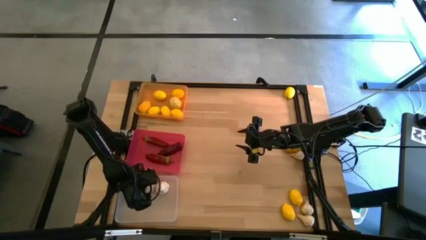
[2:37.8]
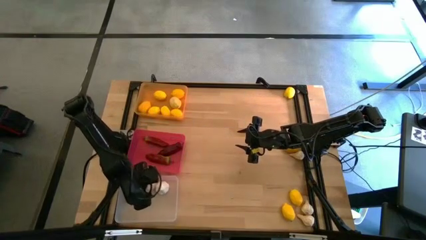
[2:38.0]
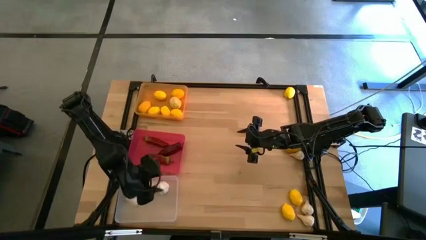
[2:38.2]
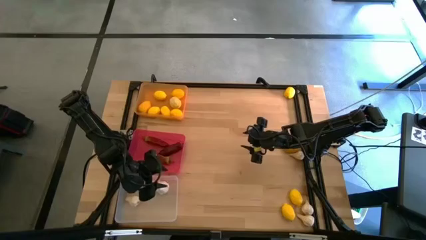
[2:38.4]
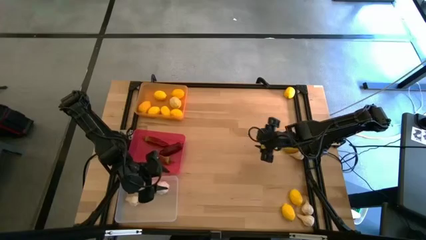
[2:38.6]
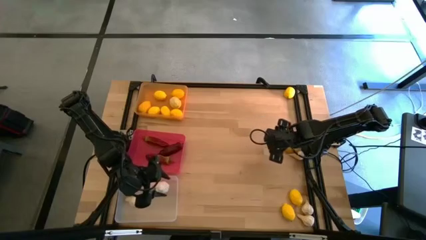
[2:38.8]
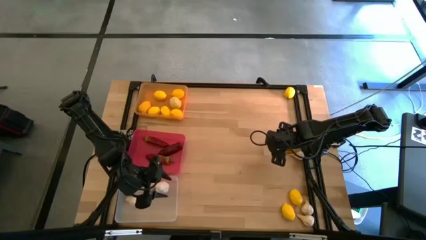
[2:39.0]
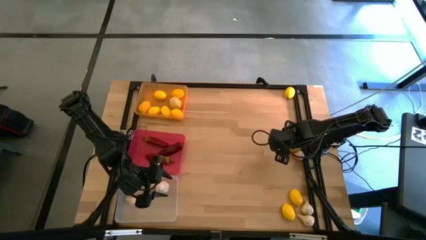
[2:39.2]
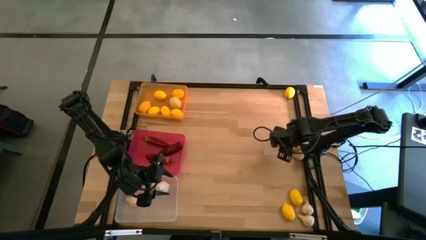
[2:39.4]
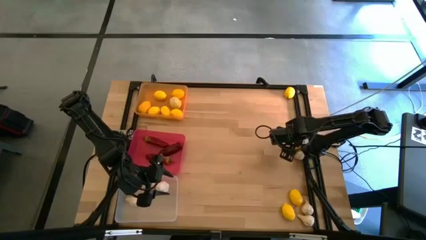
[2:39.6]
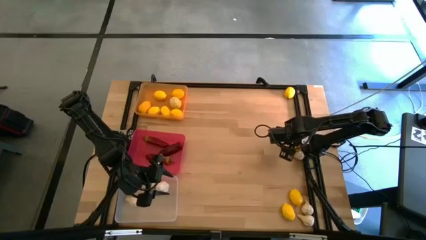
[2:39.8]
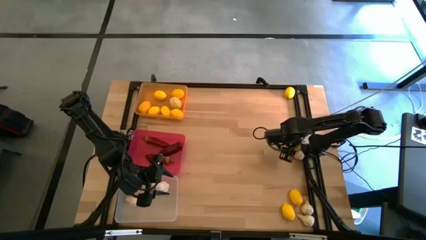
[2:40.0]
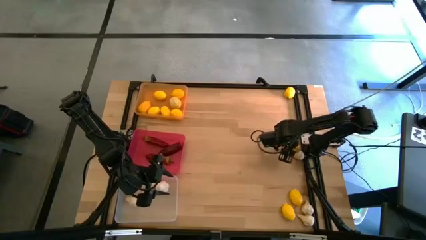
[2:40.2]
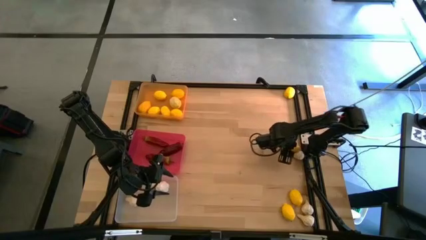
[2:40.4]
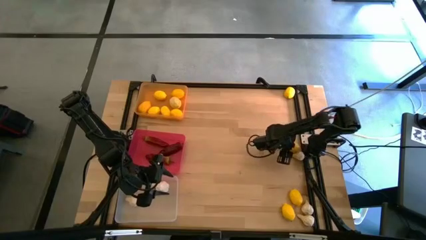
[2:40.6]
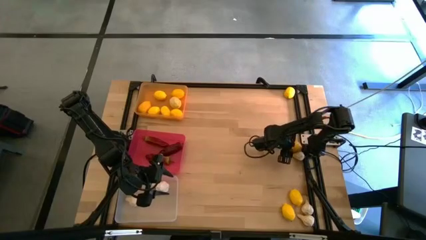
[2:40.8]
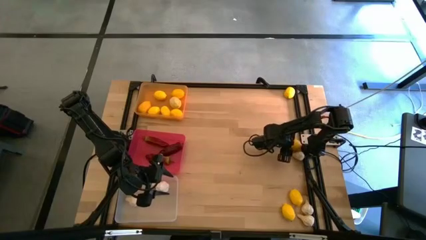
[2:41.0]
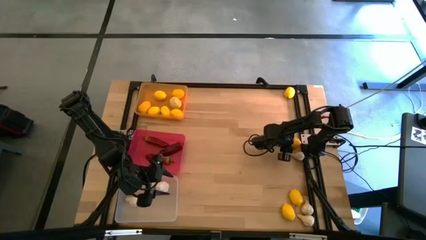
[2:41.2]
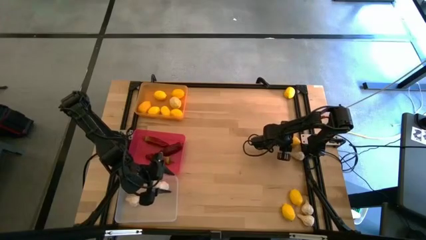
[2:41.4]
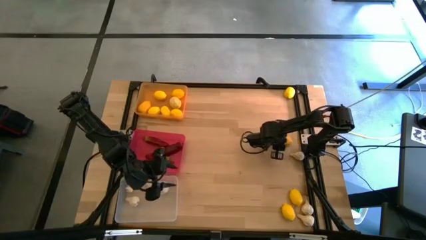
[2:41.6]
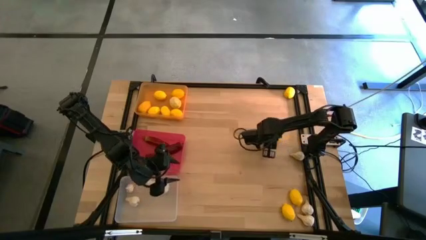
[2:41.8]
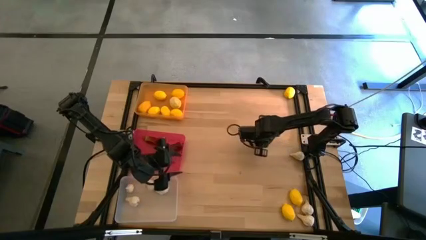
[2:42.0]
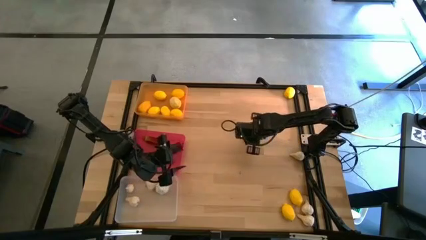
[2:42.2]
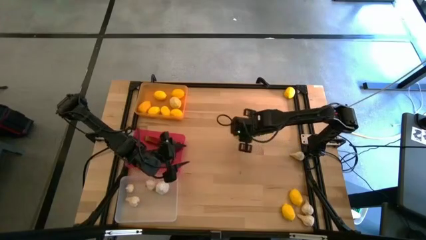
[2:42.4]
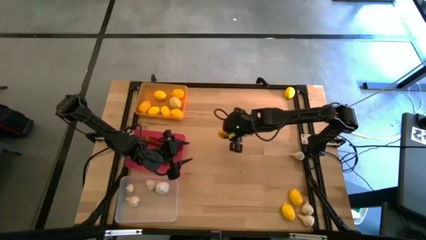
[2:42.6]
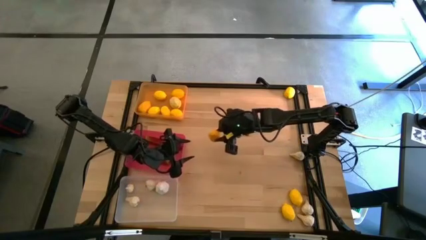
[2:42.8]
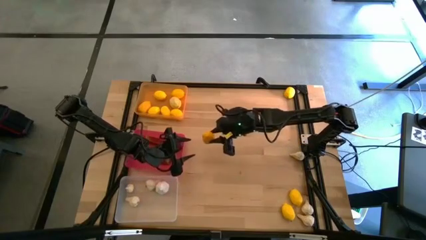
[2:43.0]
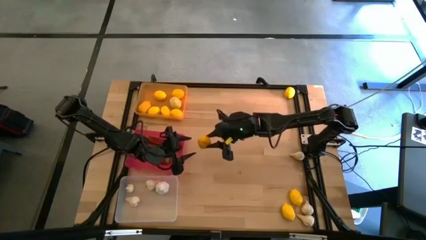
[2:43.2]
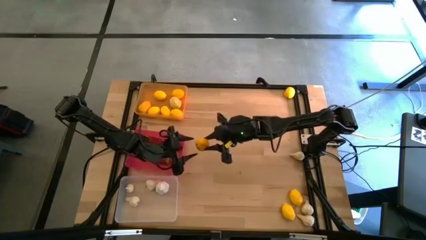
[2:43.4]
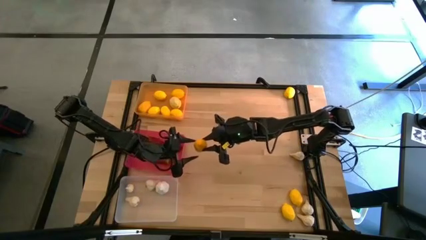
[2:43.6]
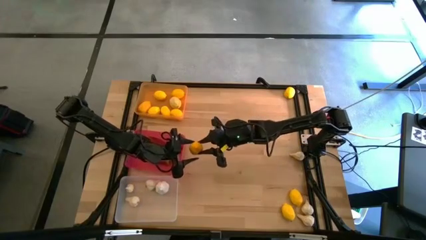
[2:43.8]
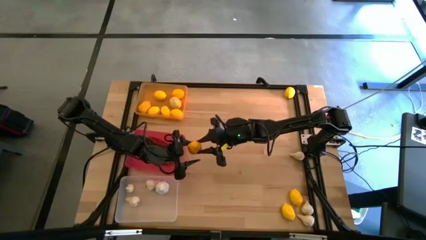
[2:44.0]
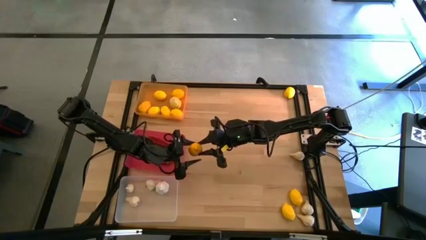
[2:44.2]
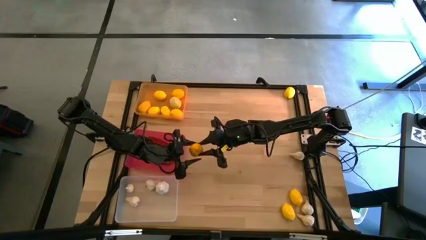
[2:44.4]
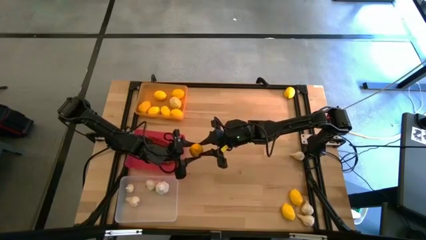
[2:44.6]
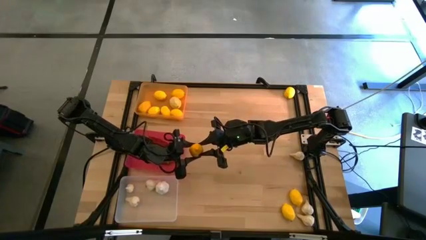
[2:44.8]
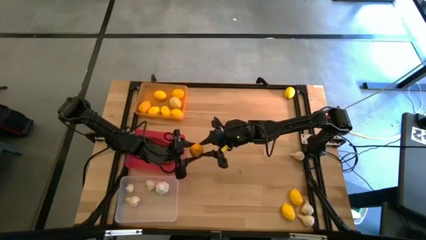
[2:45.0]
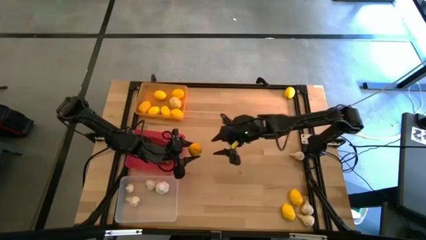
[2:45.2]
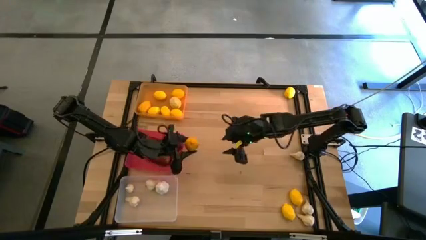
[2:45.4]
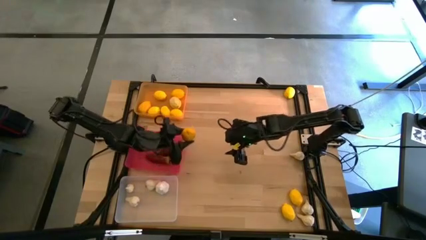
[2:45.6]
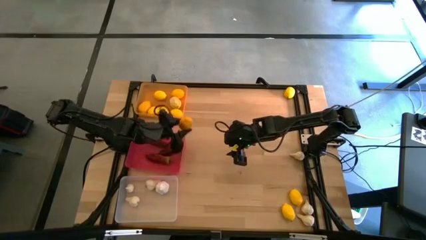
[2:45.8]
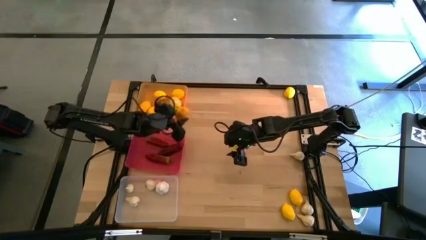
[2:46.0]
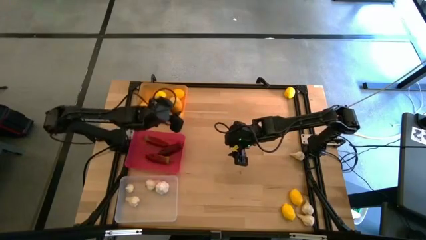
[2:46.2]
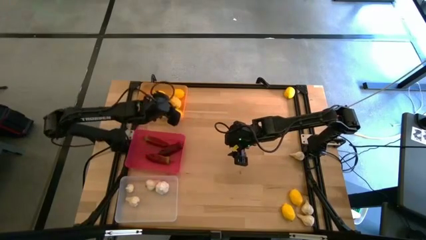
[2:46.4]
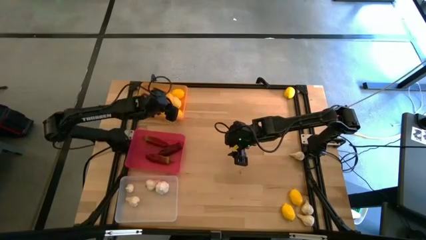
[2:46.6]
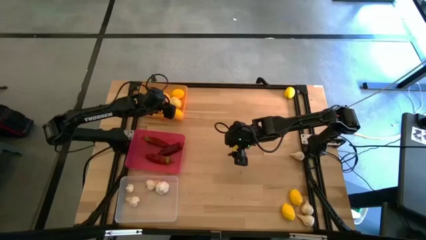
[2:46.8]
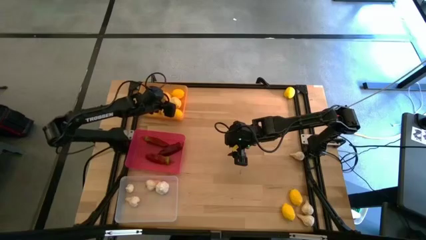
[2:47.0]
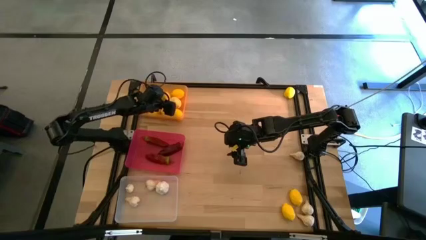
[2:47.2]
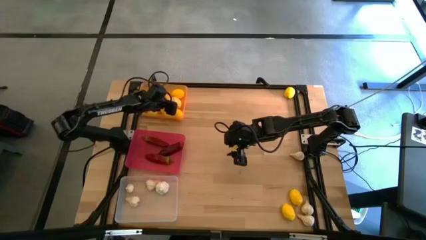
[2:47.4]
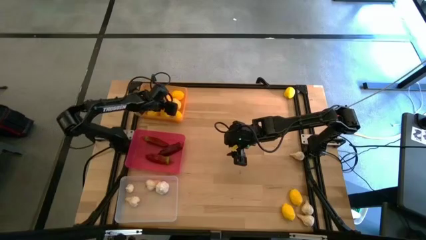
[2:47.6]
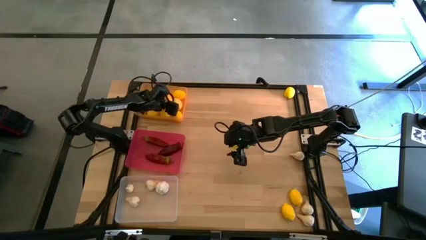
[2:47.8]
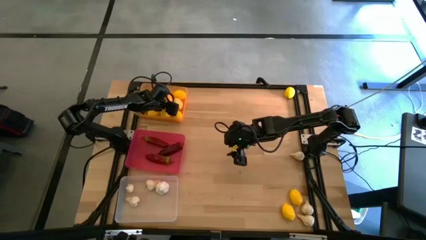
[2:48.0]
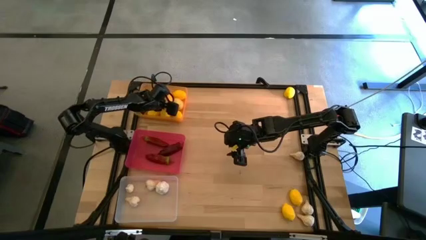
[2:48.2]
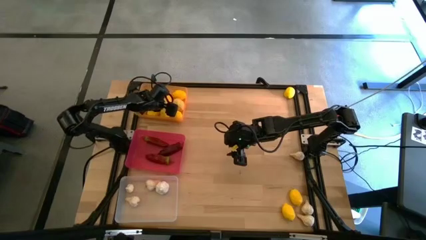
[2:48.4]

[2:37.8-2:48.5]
Task: Sort produce into baskets
Put the lemon into the yellow bin

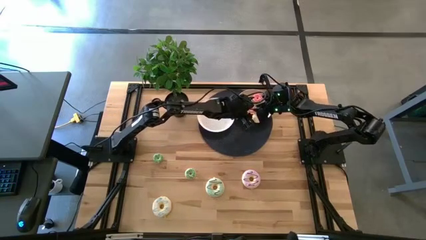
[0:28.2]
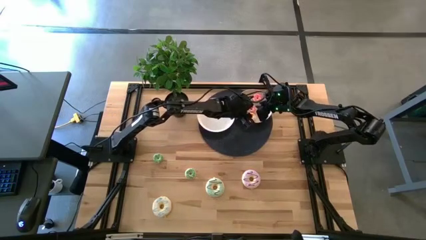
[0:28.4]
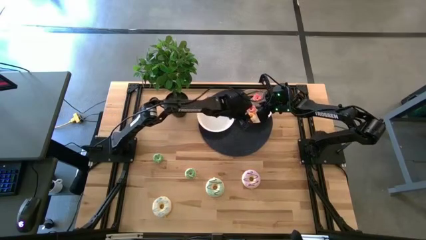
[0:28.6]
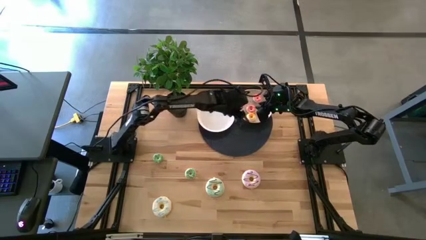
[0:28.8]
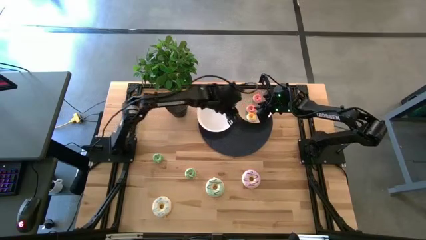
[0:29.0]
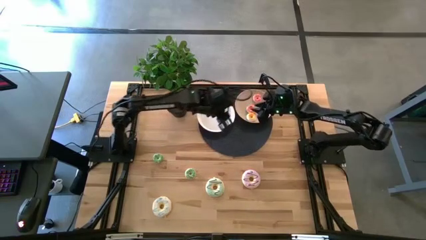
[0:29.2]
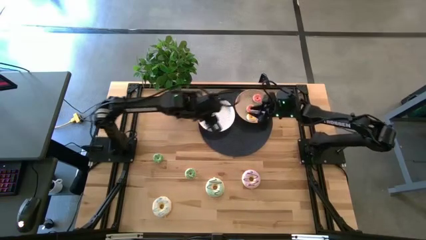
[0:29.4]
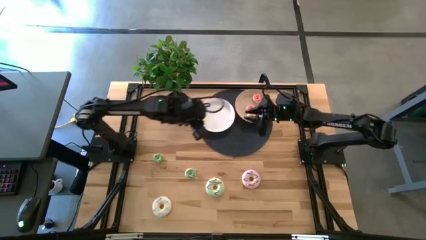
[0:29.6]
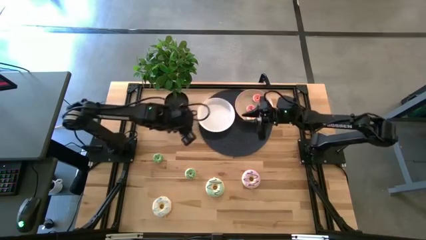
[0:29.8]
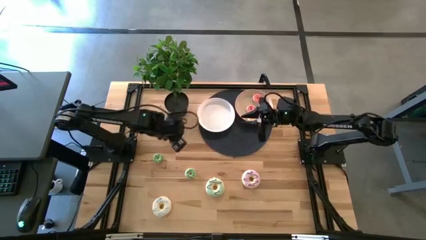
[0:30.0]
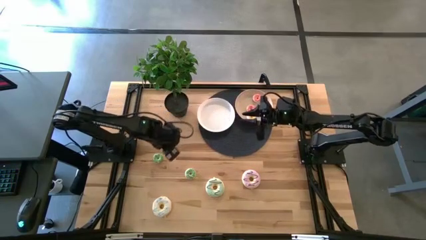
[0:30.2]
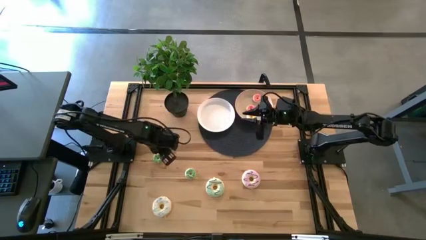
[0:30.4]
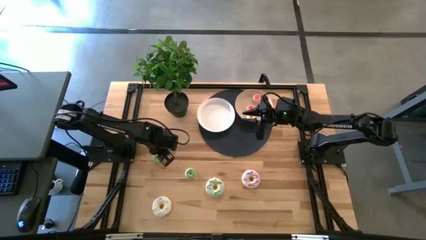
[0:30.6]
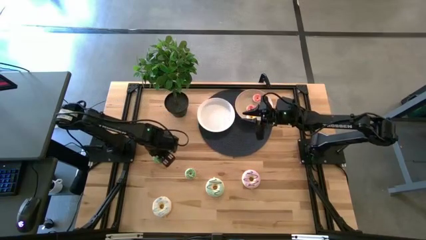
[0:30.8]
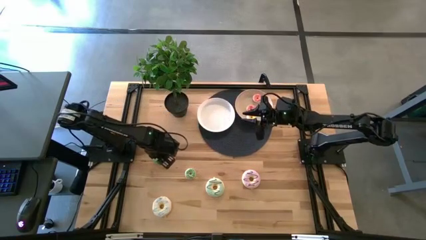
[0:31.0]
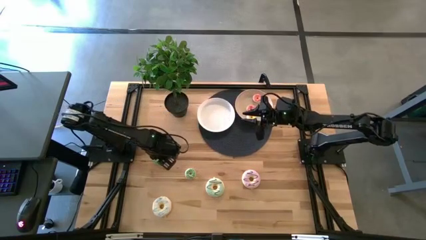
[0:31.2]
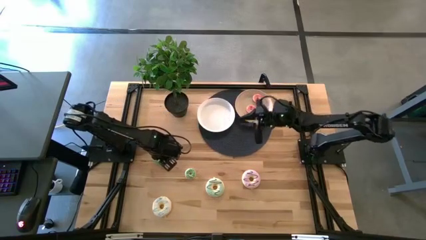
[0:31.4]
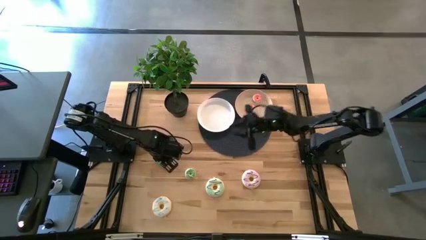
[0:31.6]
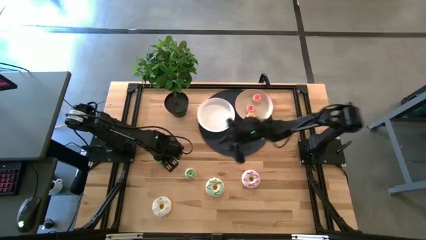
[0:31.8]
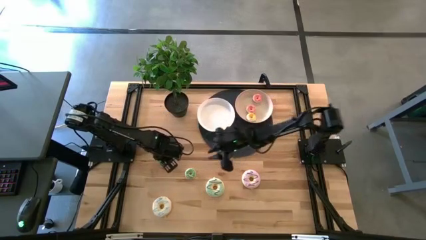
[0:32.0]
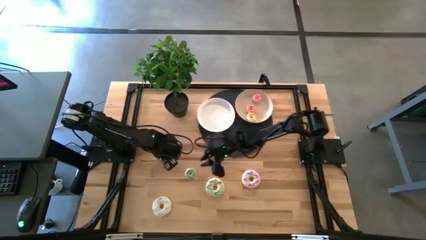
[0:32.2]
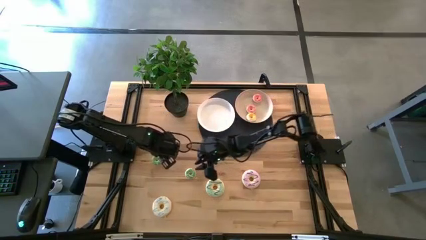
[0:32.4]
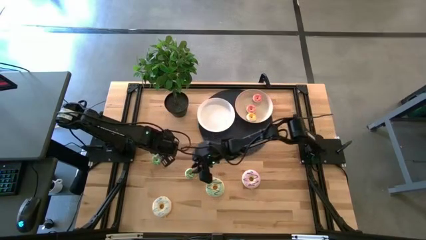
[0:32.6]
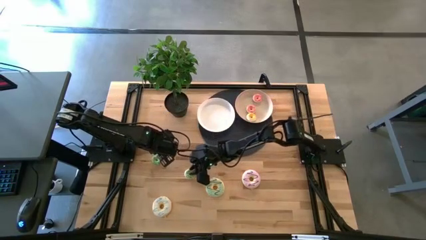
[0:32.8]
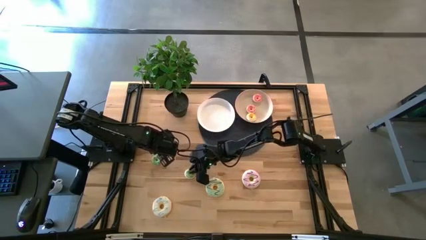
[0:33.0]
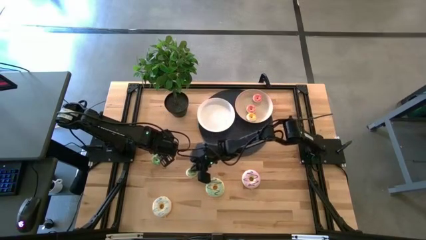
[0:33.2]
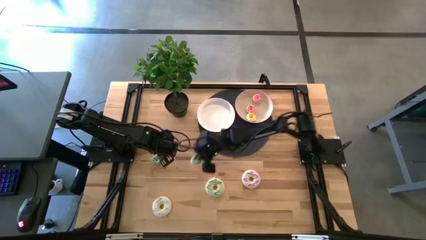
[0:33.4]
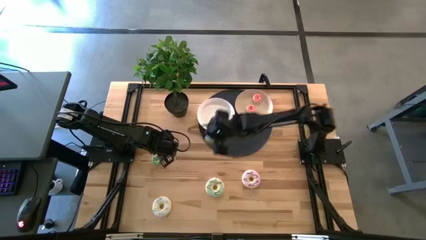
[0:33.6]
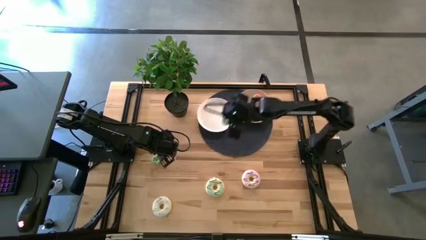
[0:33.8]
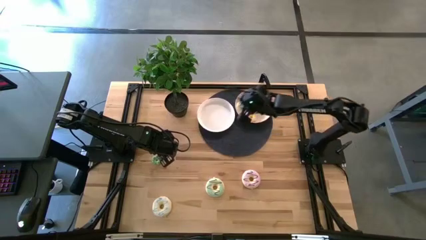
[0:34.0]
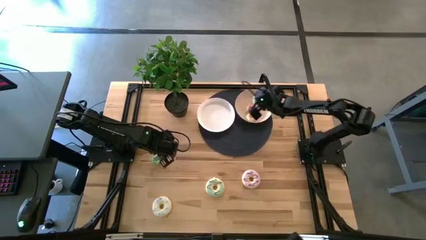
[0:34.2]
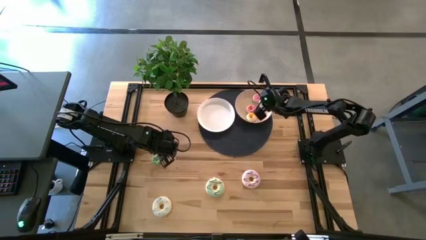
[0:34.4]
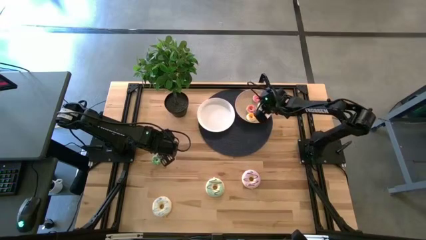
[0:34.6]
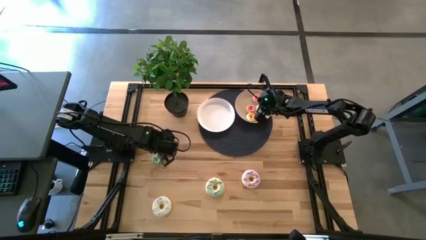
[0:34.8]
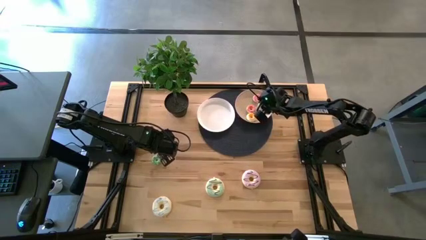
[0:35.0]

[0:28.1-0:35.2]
Task: Pick & Place donuts
Put the right small green donut on the brown plate
